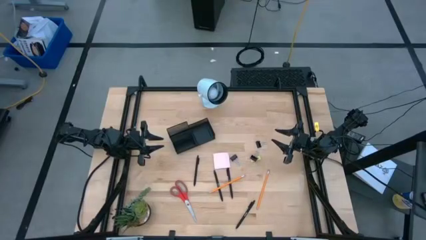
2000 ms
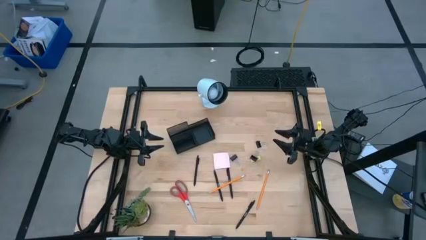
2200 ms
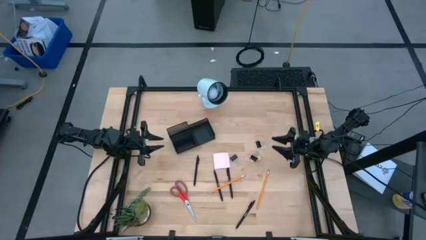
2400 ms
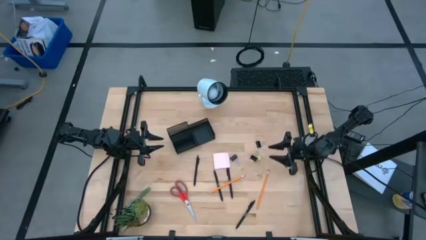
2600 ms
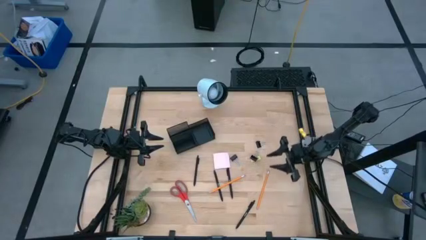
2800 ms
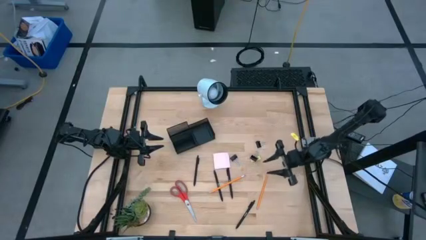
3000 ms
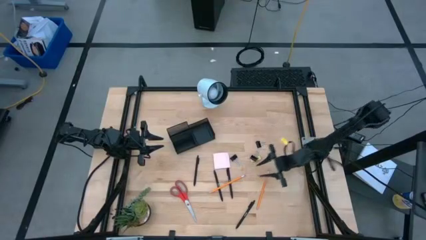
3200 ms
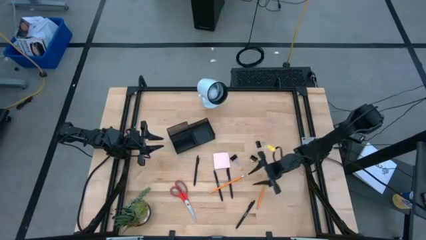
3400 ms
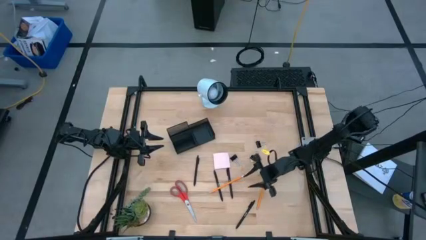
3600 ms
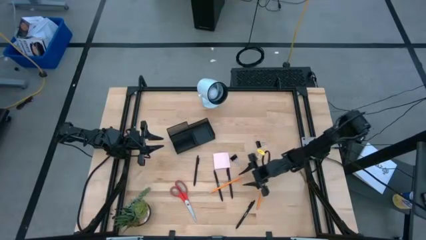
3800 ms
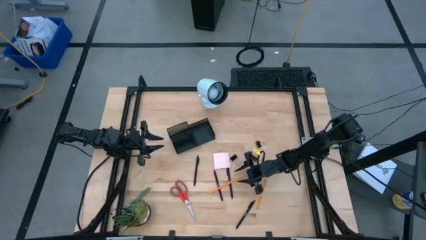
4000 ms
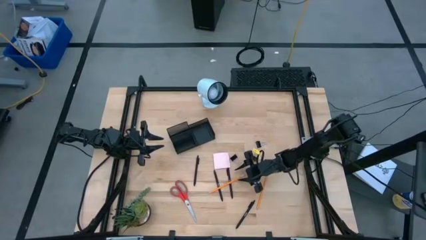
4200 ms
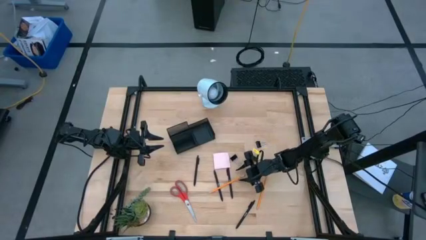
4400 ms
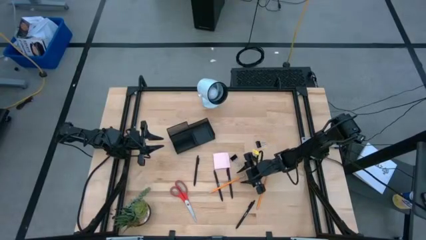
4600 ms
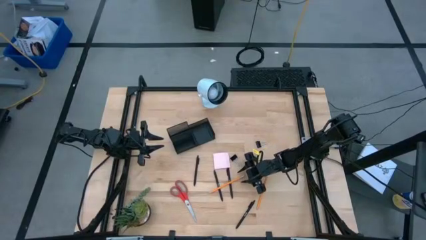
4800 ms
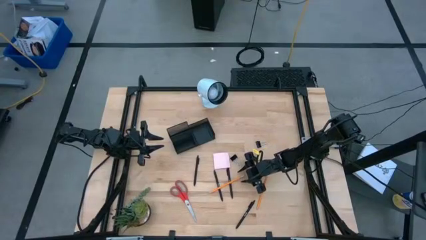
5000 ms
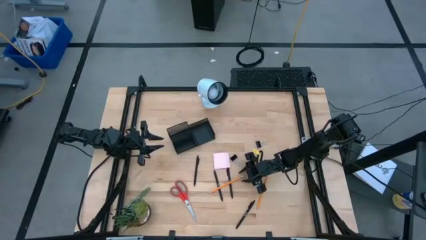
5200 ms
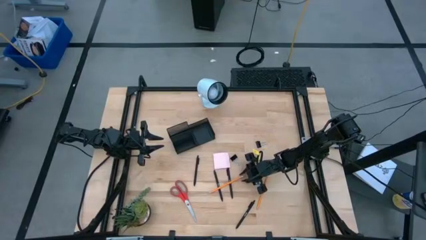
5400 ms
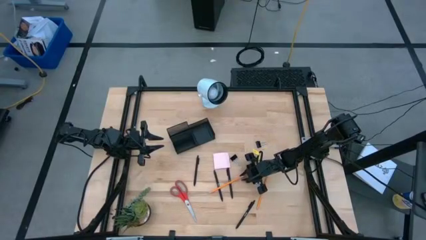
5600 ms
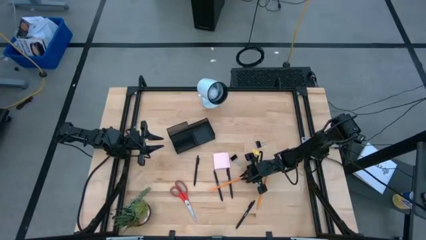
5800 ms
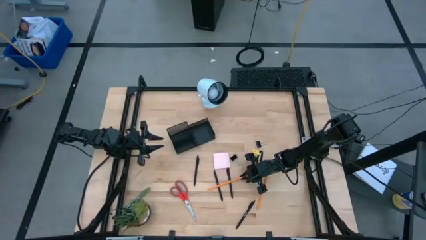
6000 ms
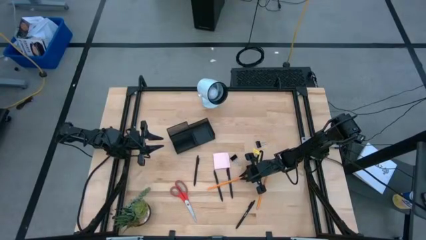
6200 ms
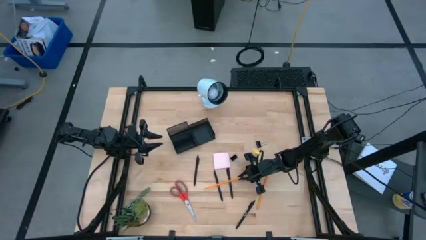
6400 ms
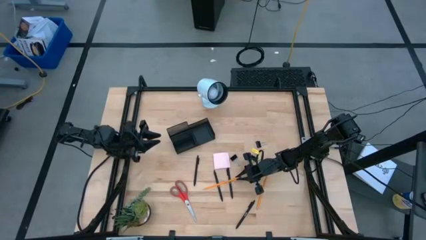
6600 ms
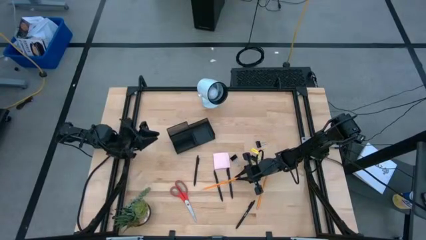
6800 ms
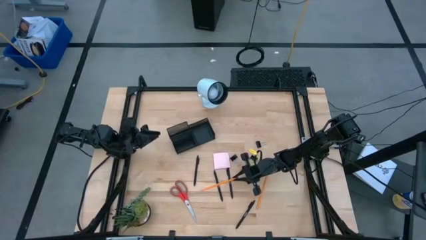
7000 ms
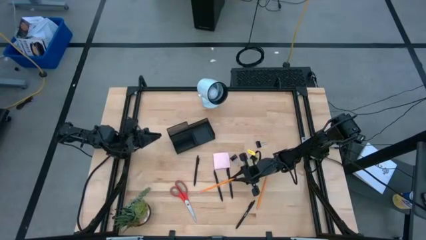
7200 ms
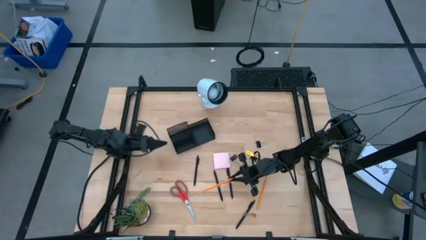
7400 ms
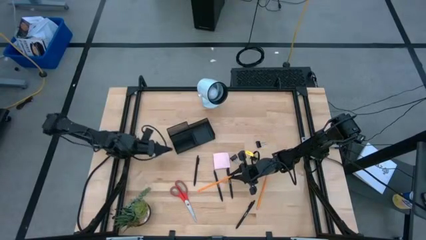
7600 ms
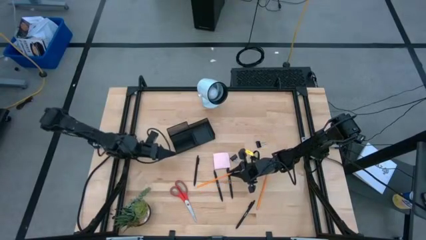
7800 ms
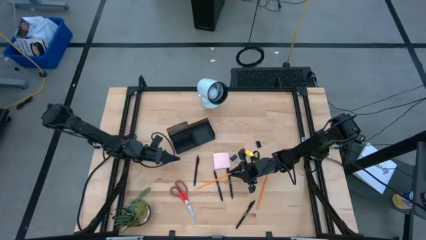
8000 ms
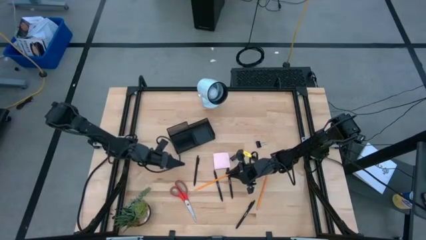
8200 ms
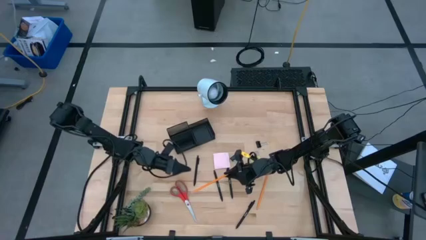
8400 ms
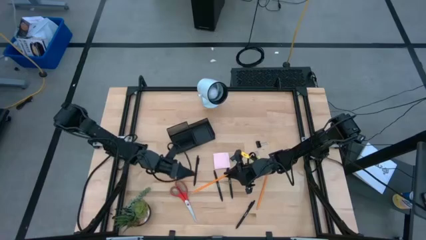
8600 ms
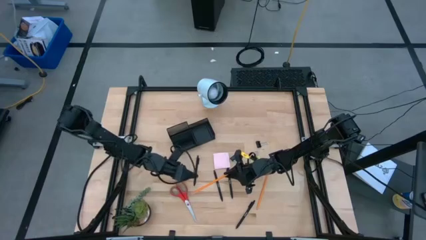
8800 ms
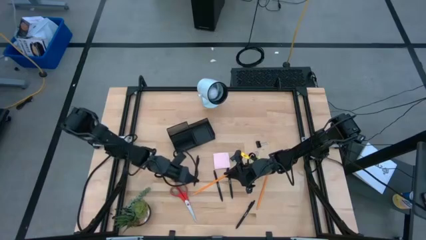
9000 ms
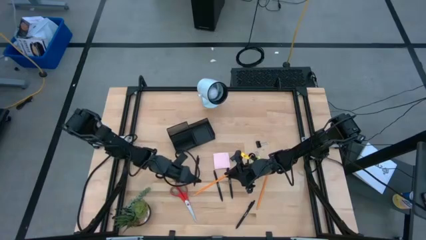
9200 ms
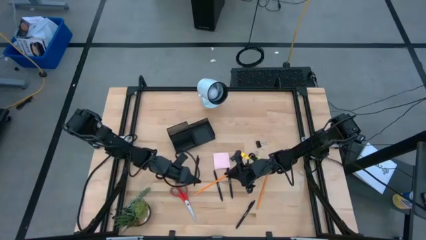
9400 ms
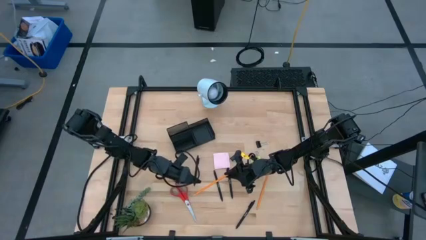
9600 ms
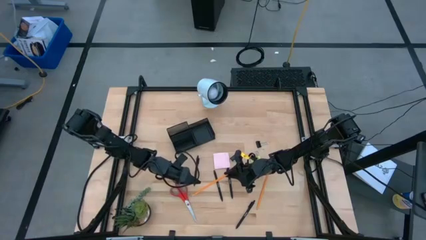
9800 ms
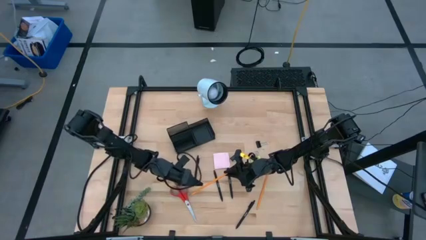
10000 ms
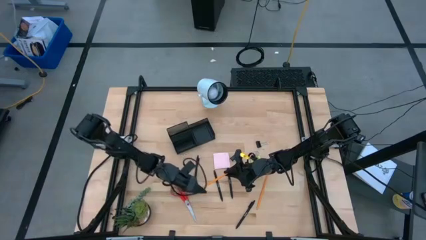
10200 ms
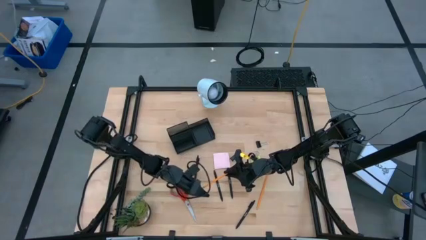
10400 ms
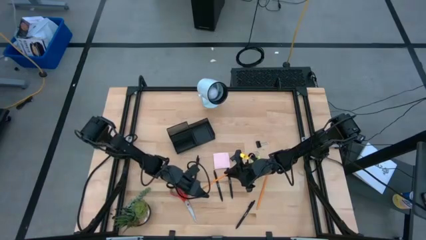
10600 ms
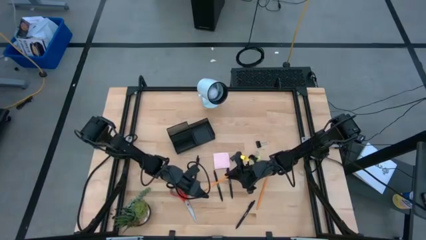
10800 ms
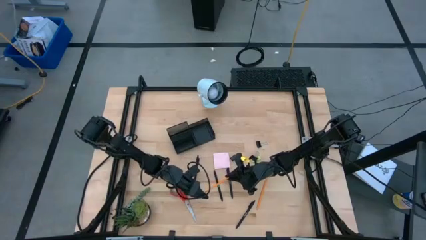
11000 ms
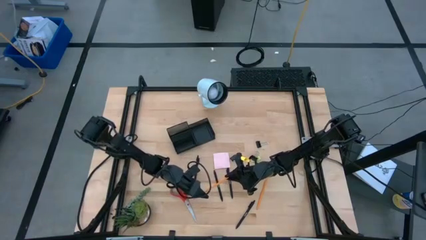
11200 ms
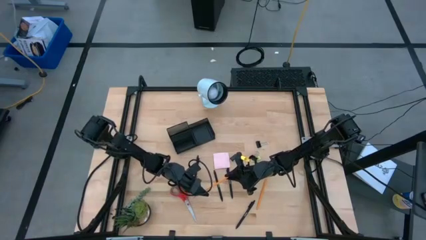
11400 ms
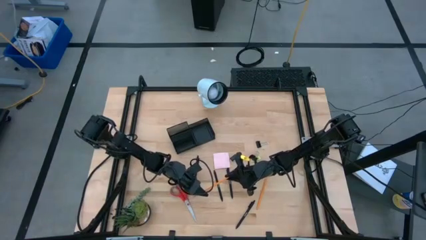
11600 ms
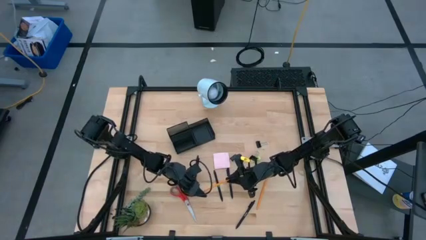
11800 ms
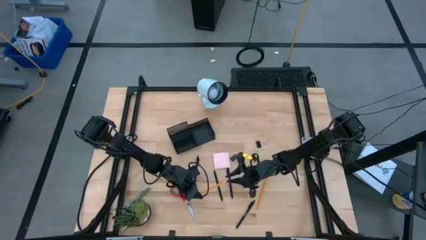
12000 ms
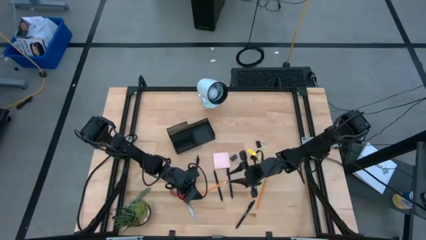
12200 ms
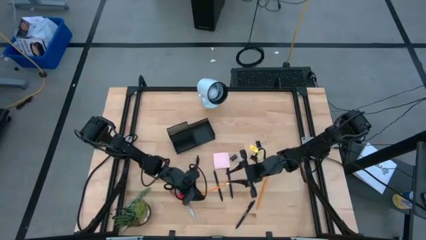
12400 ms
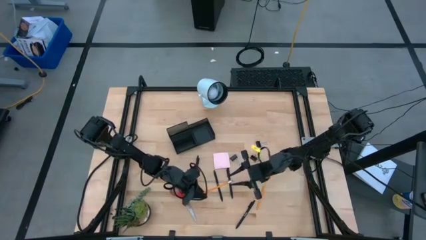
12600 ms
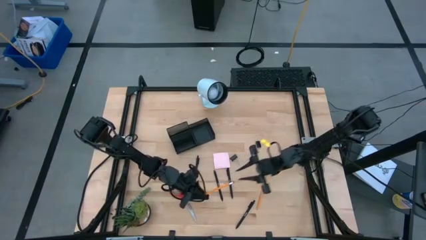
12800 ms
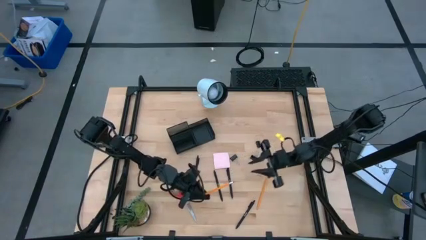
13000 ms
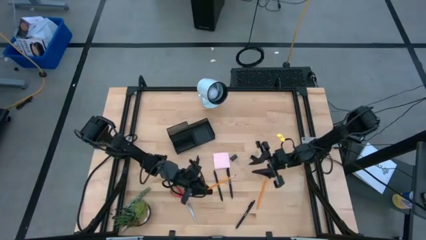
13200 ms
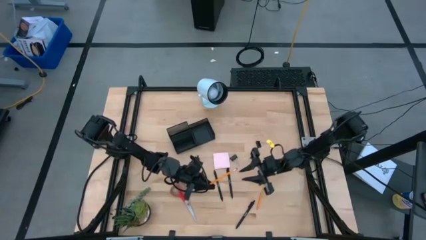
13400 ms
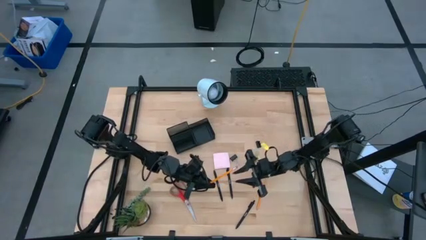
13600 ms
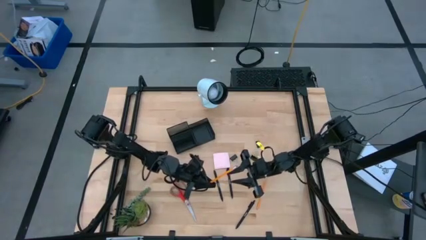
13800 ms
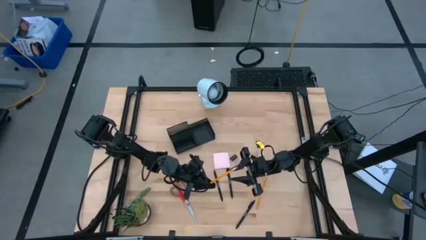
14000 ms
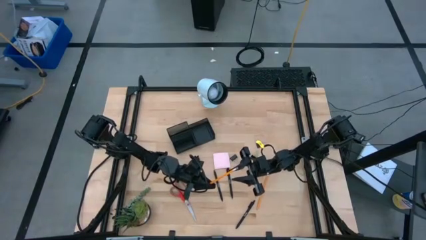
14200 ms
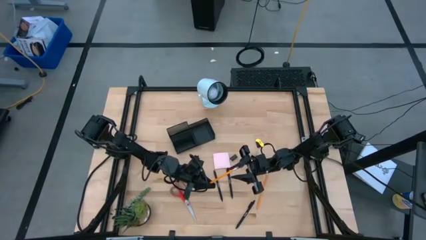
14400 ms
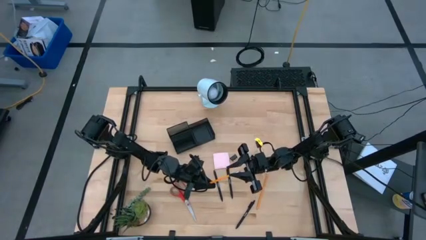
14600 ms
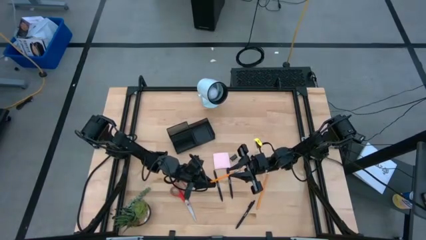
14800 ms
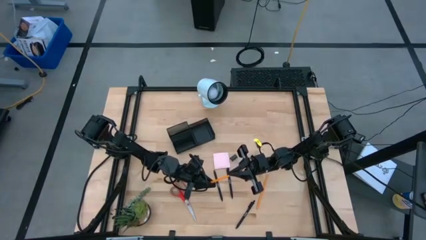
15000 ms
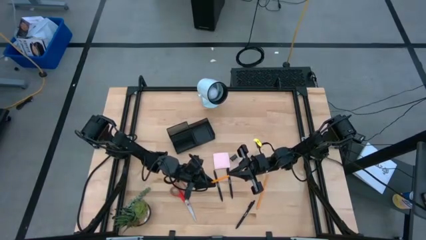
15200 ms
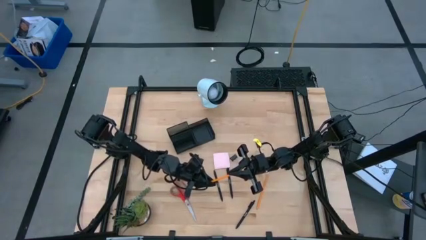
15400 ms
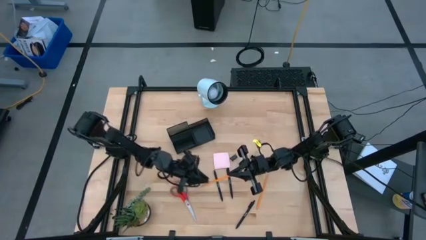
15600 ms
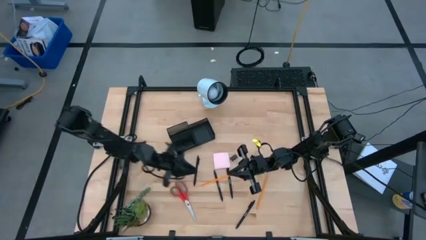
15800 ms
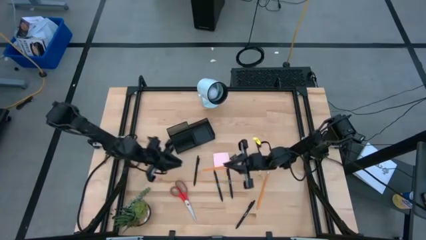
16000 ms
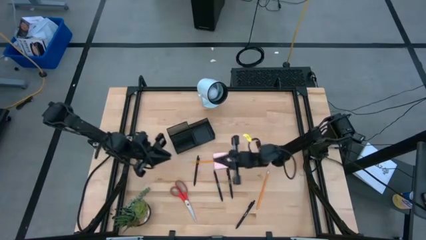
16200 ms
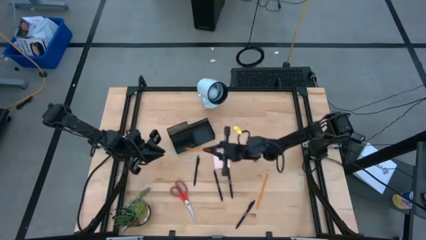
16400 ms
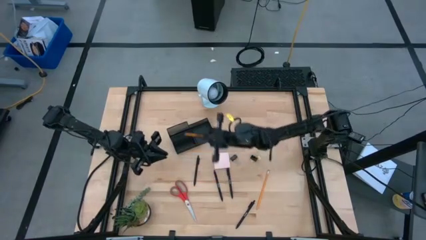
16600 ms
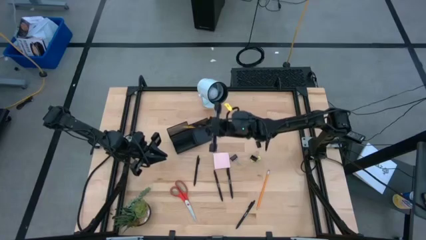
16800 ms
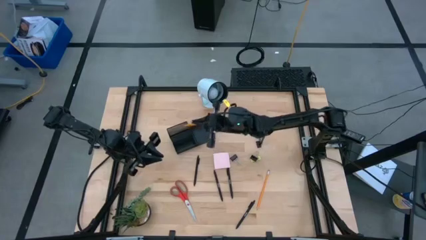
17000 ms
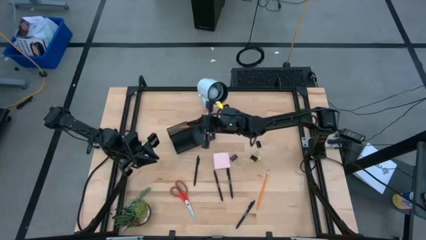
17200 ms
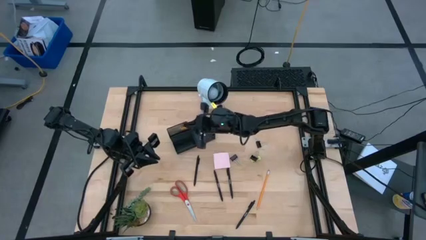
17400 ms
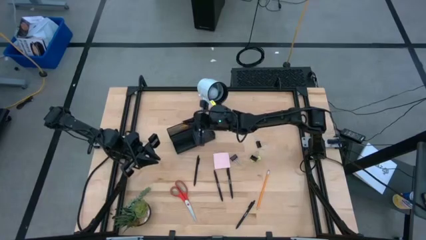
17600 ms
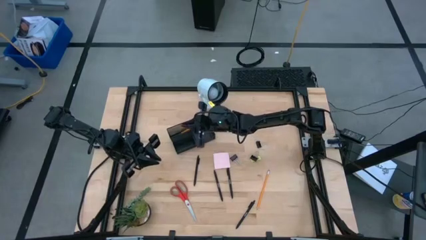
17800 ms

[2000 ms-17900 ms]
Task: Pick and place office supplies into organizer
Put the orange pencil into the black desk organizer
